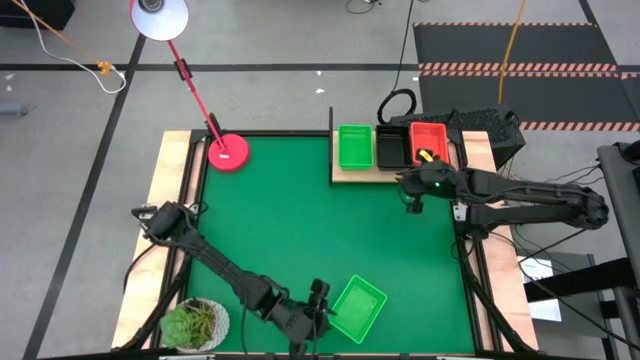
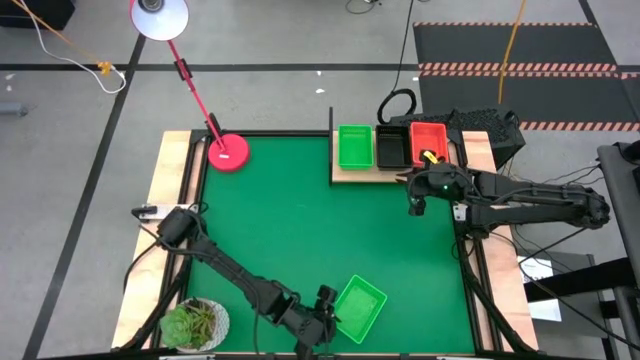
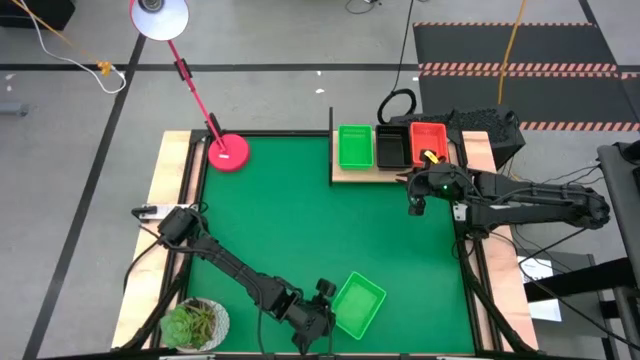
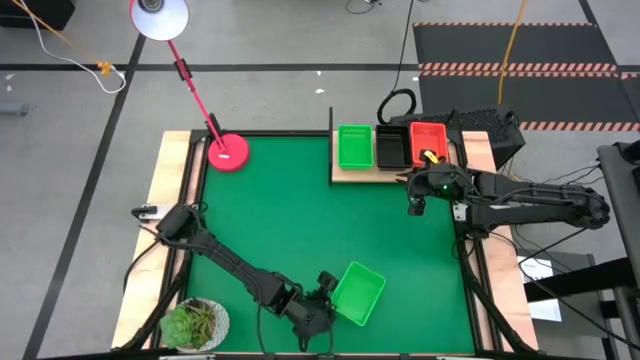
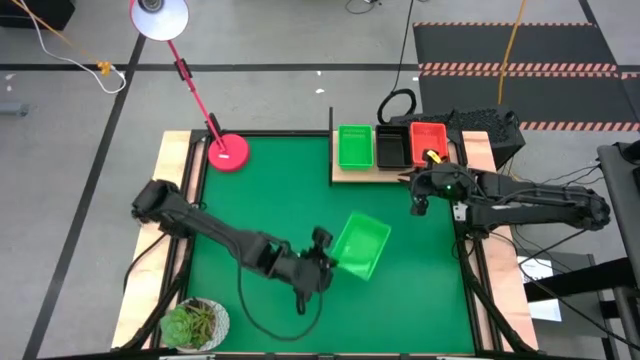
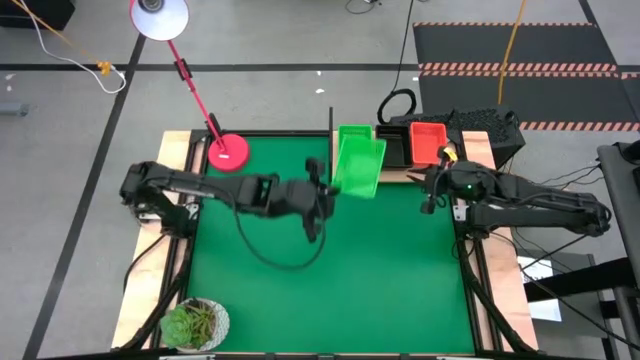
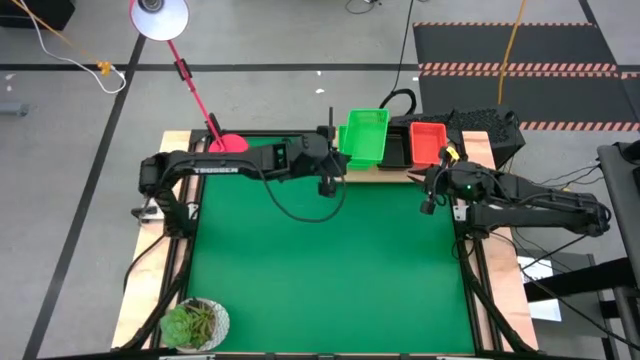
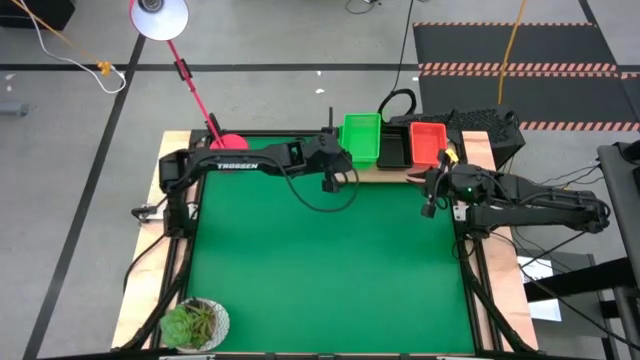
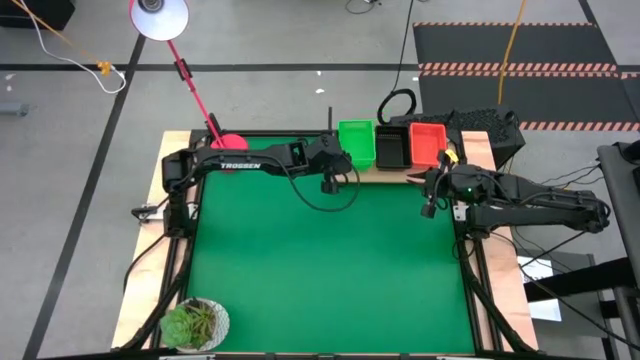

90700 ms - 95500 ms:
Task: Stack baskets on shelf by color
Stack the green bin on top of the green bin on the shelf

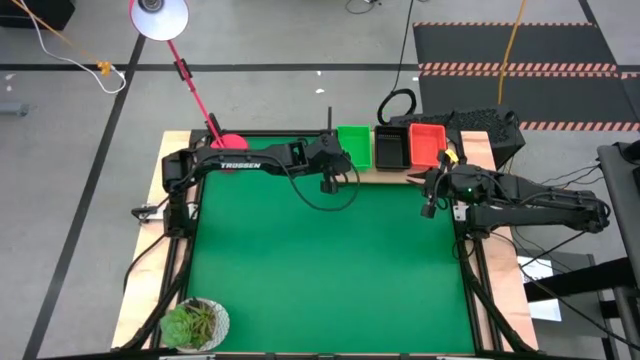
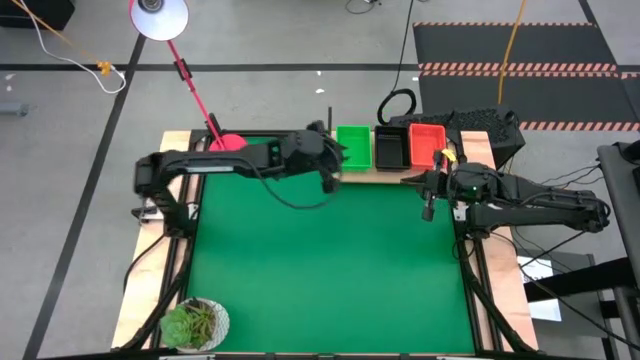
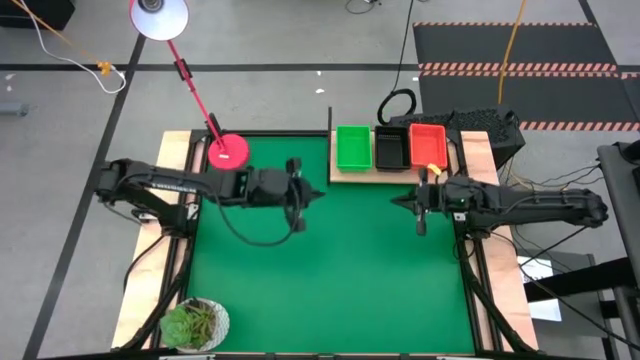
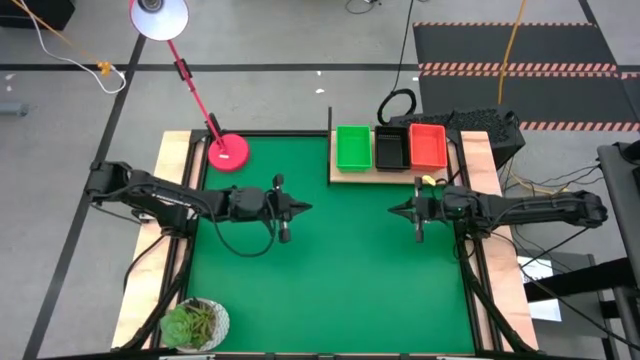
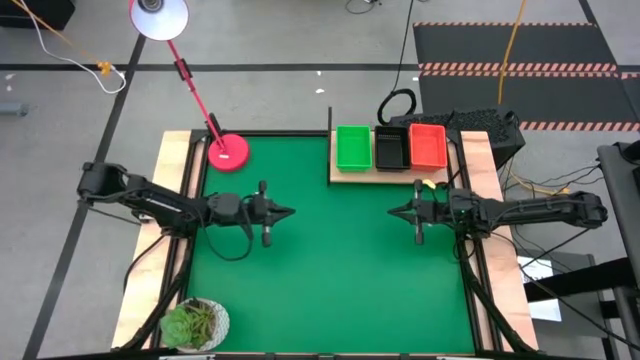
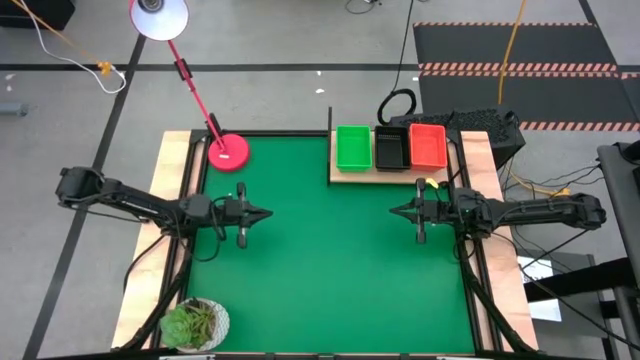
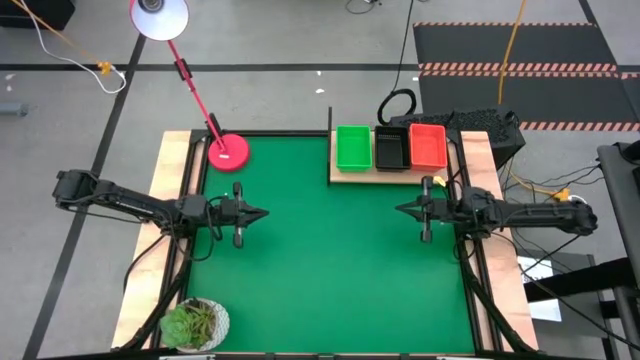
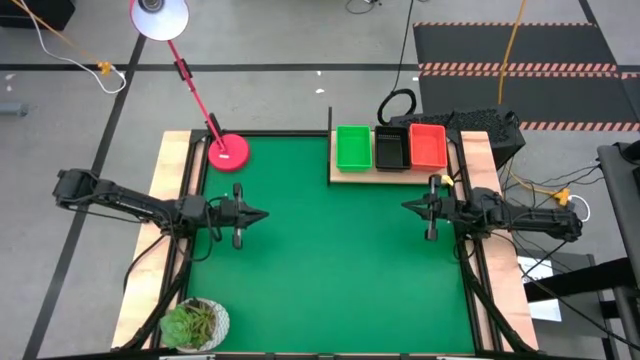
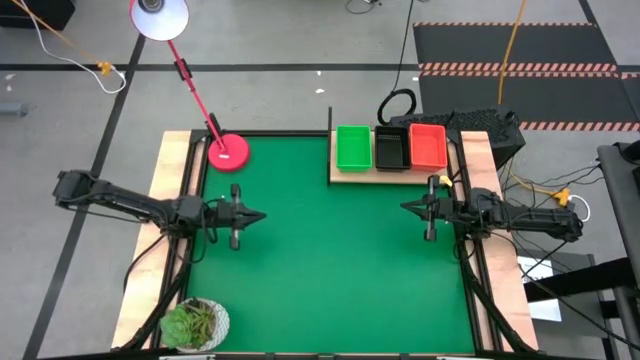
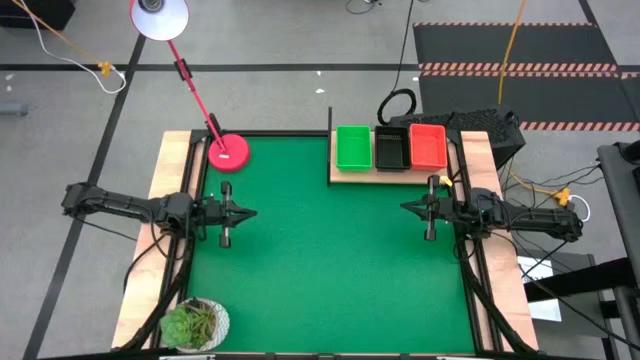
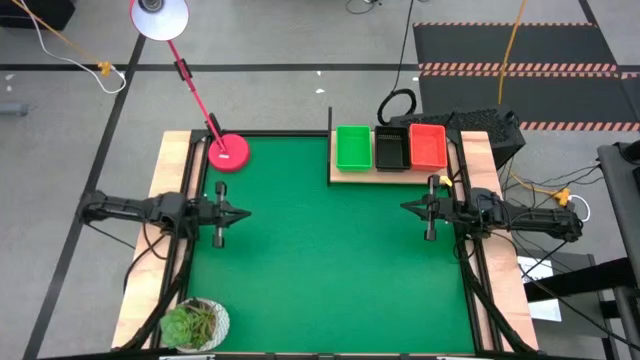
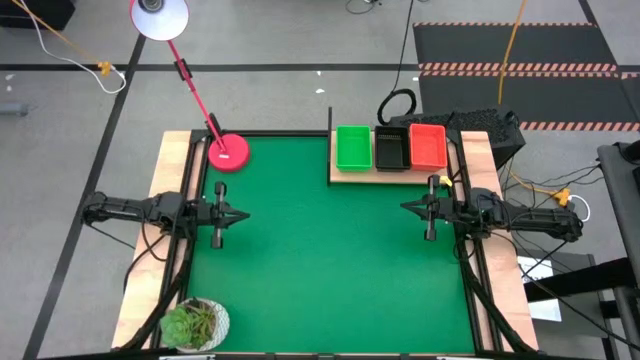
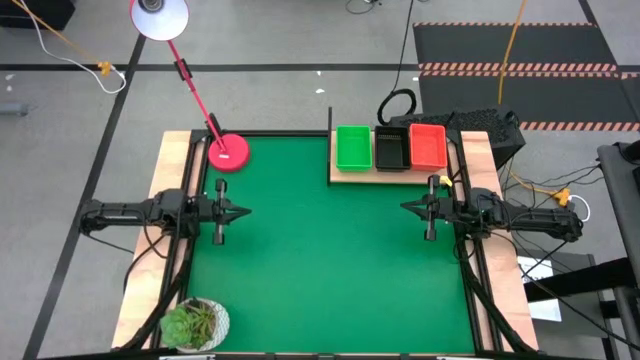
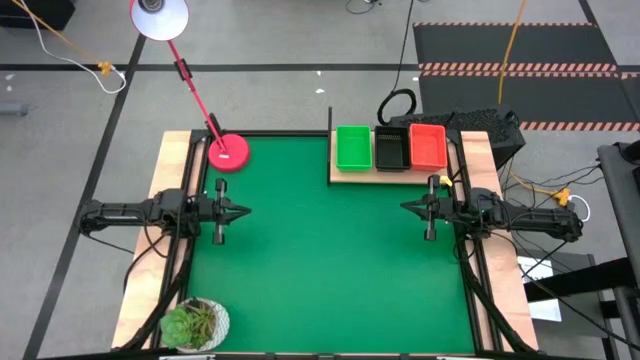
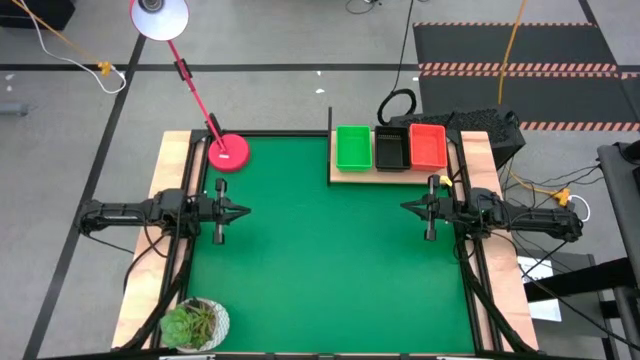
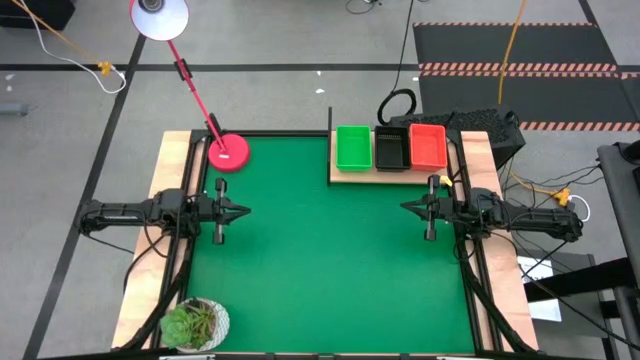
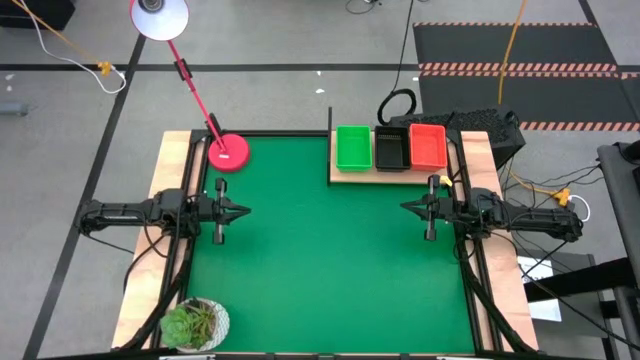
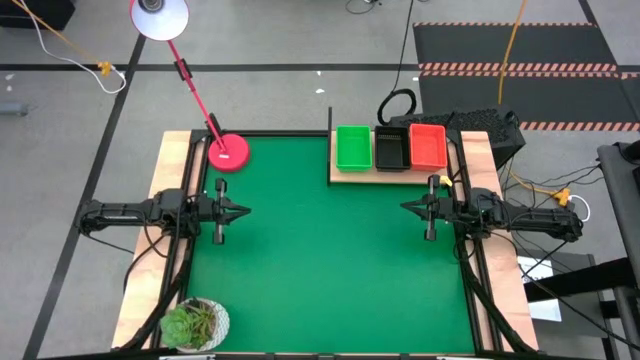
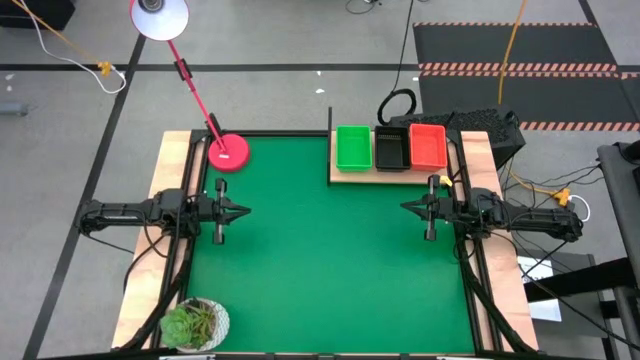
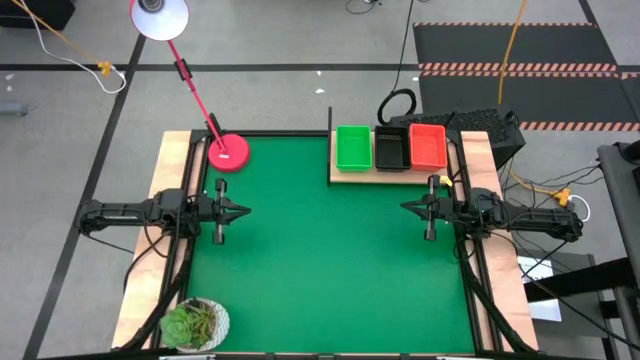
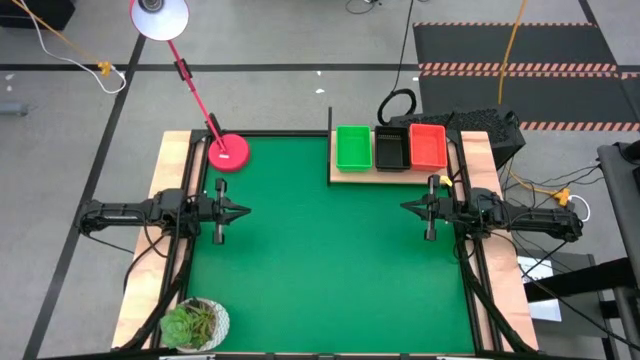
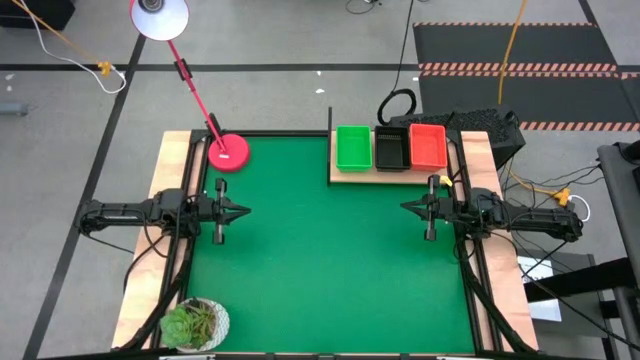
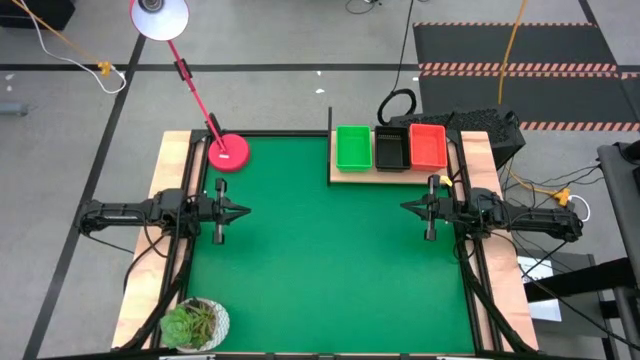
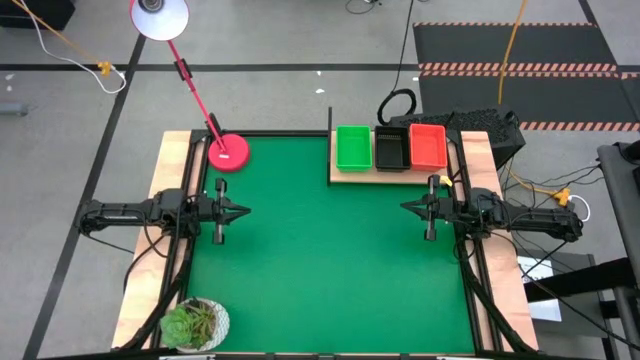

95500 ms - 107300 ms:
Return to Home Position

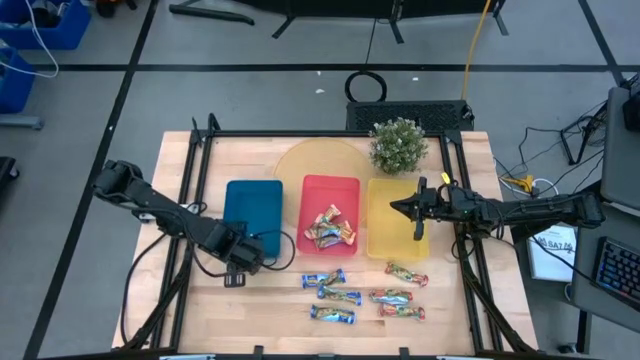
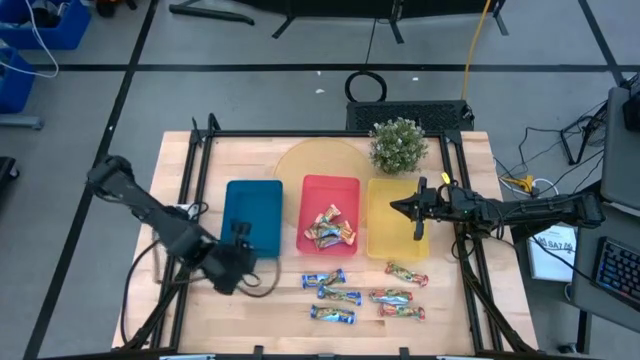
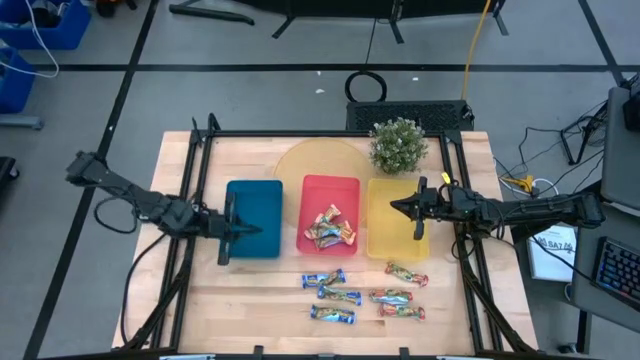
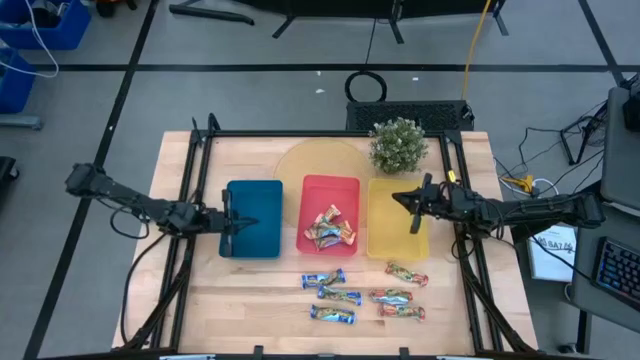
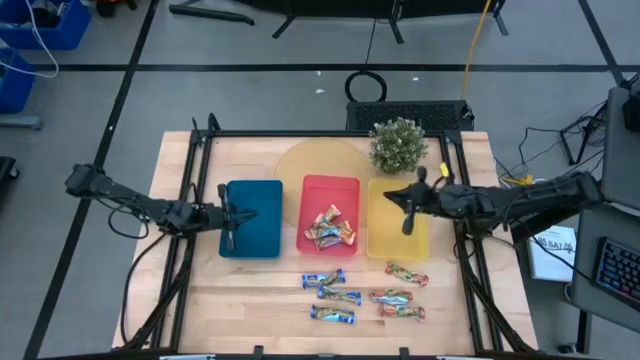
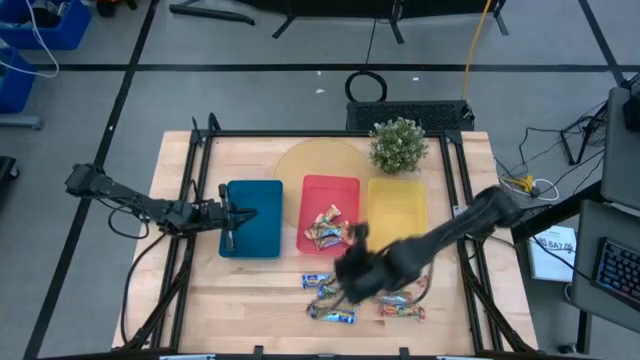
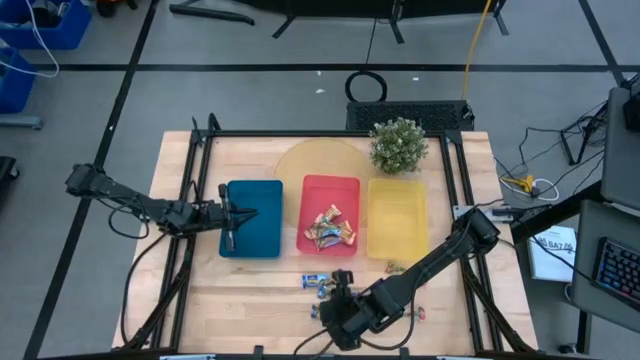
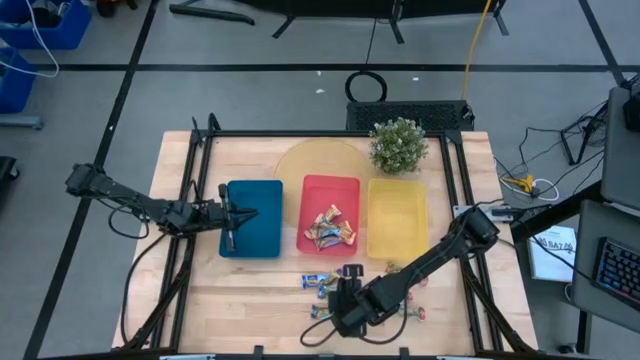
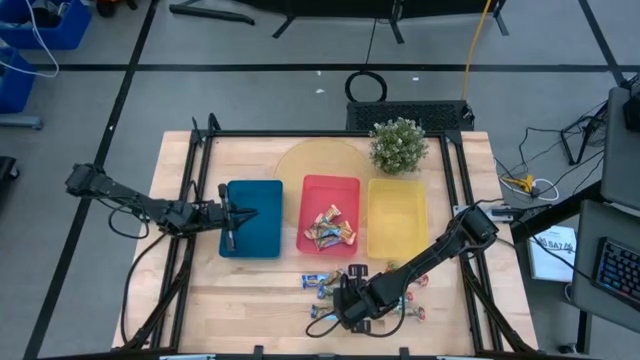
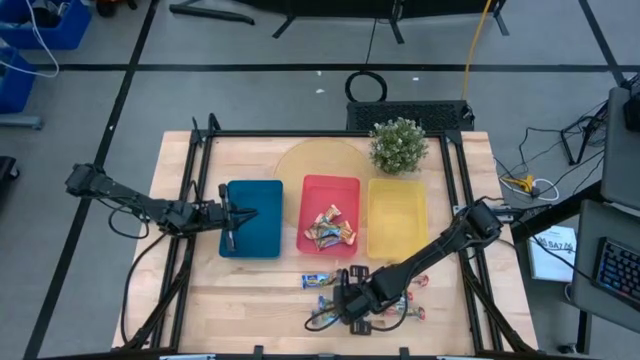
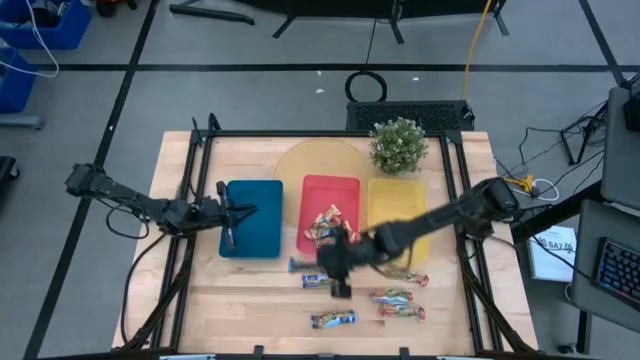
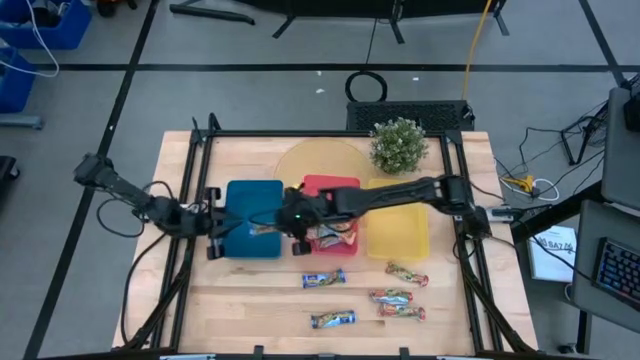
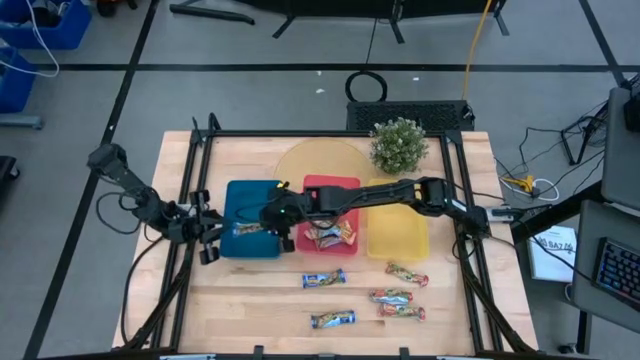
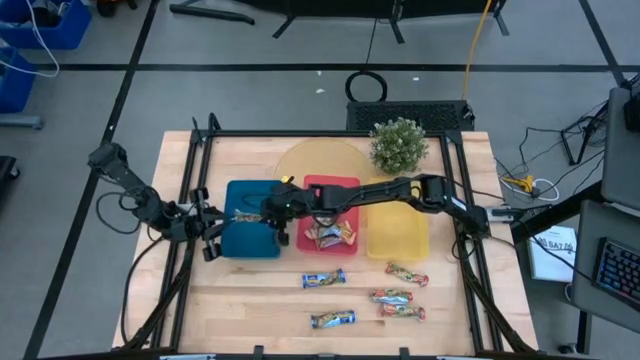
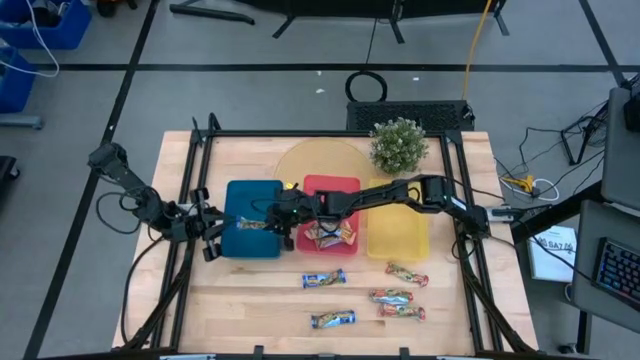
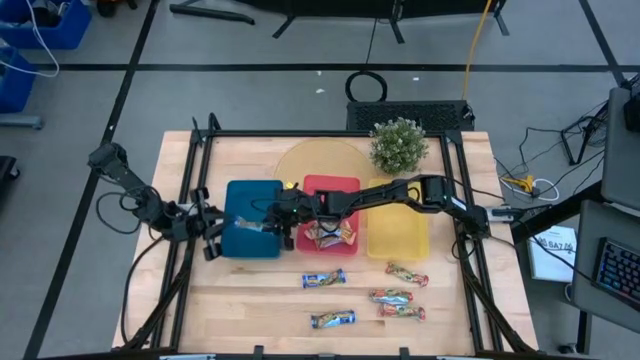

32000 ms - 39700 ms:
Task: Pick and place Granola Bars by type
Put the blue granola bar into the blue bin
